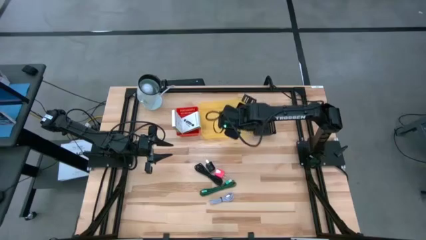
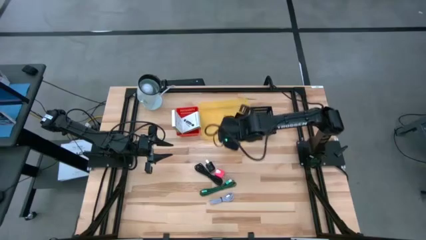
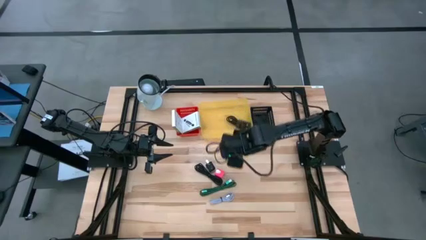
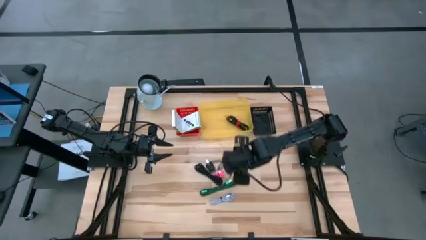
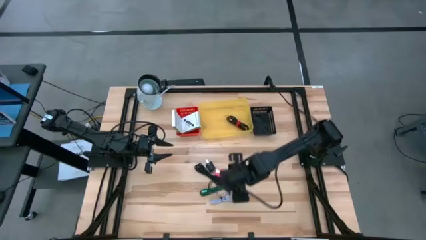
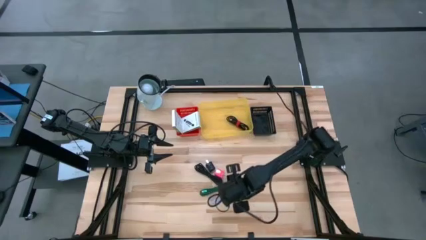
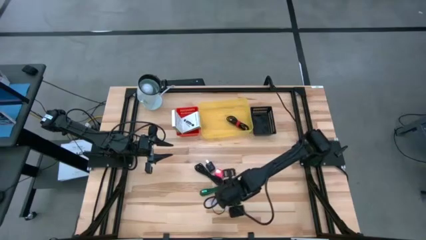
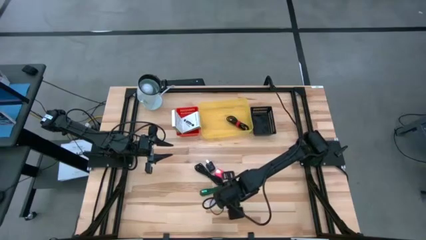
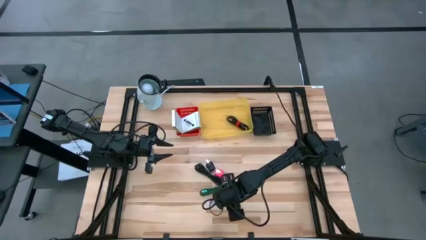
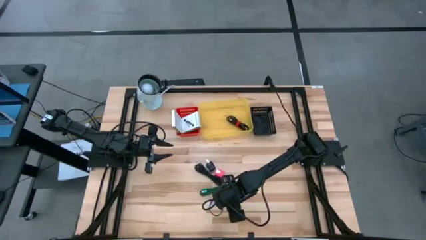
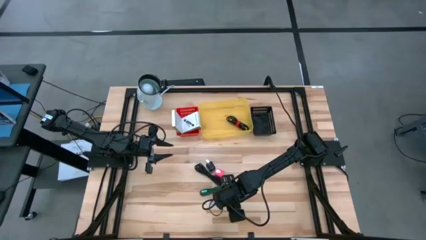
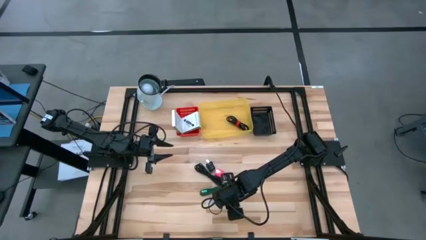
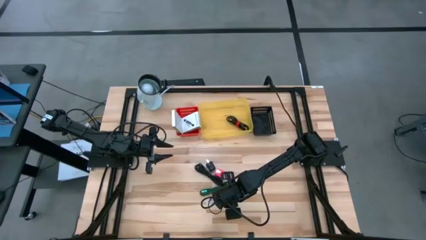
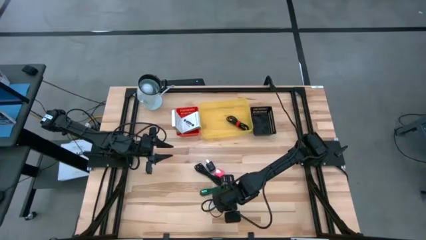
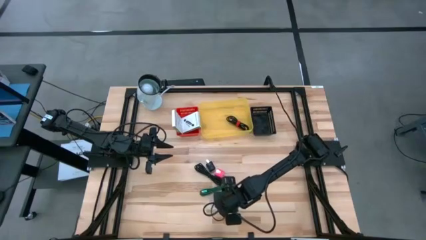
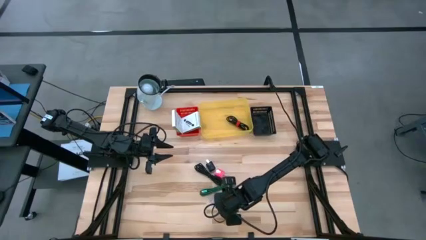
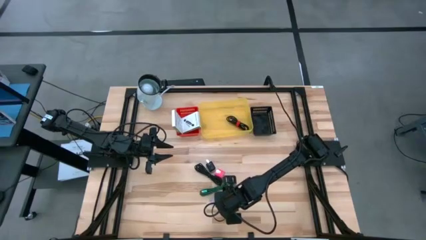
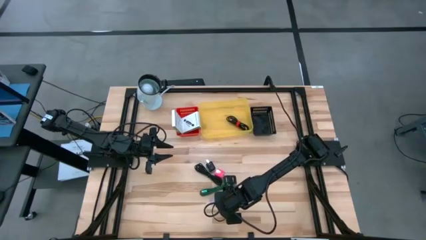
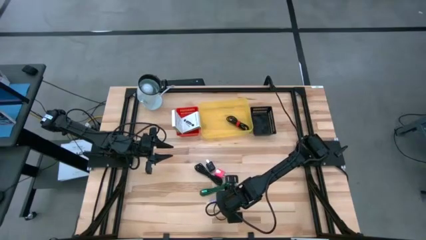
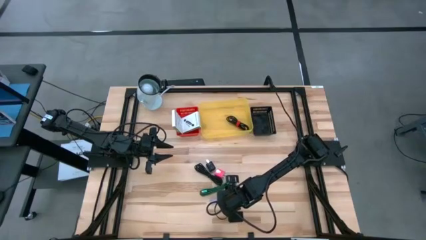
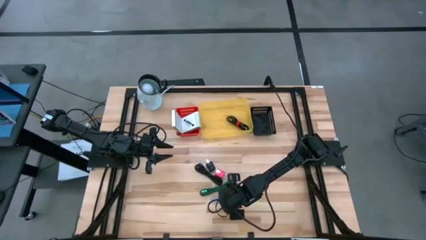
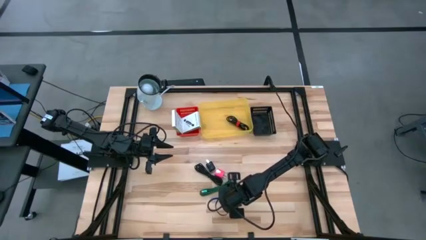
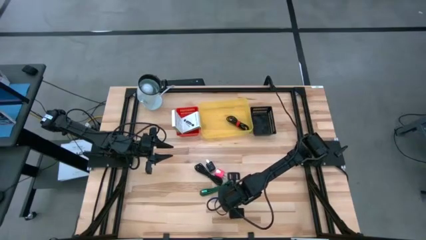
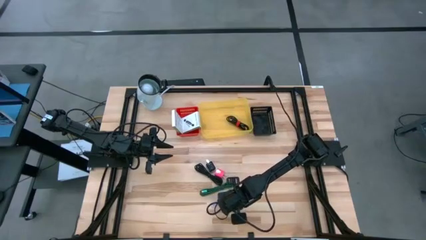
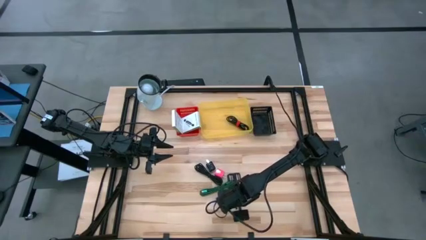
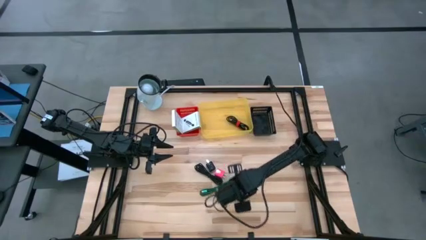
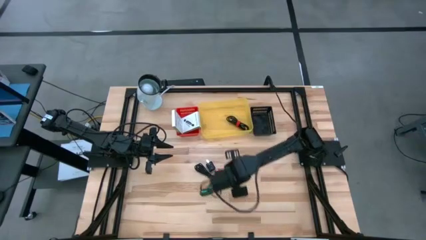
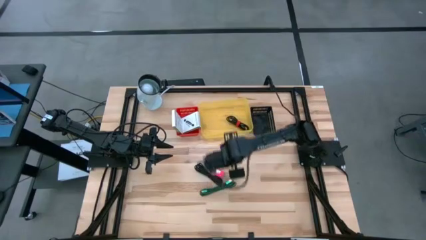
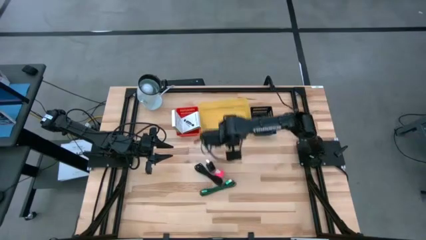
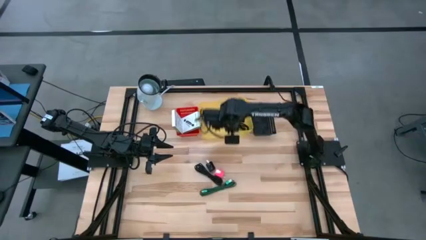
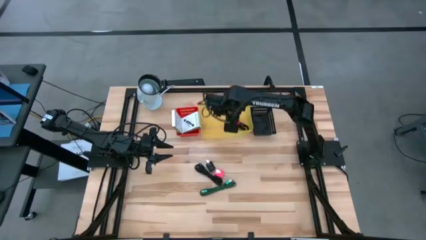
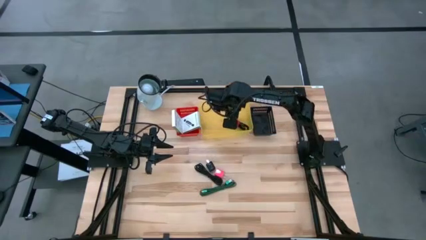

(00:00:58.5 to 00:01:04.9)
Task: Pick and place items into bin
Put the white charger cable into the yellow bin

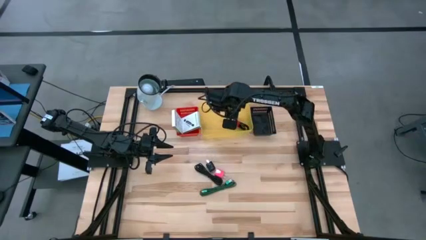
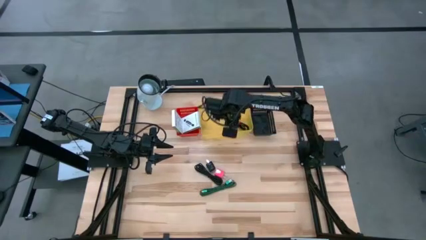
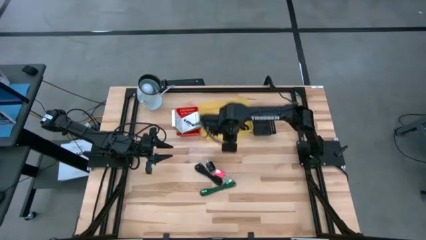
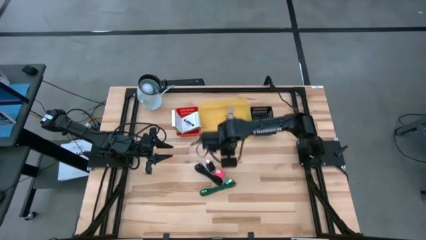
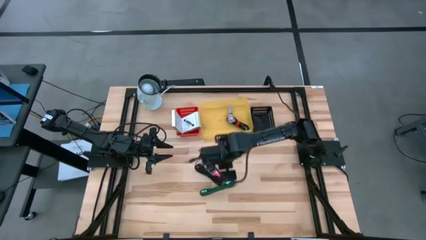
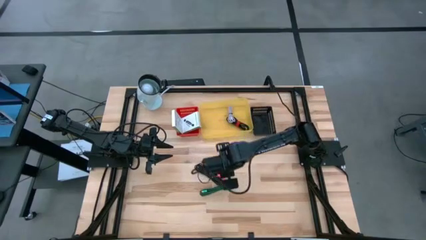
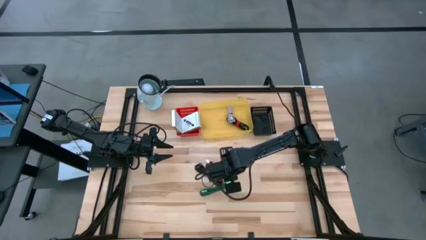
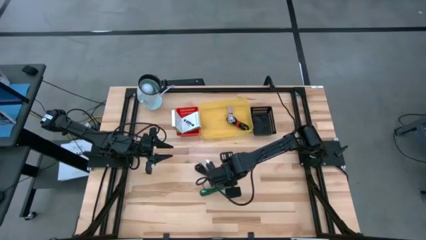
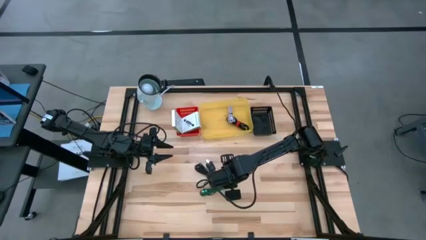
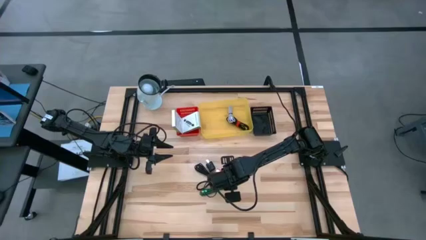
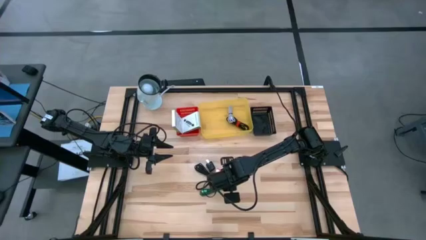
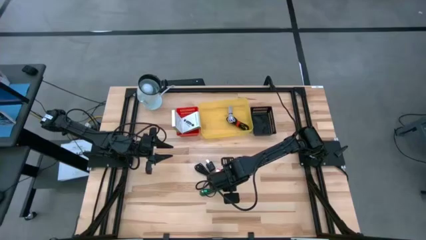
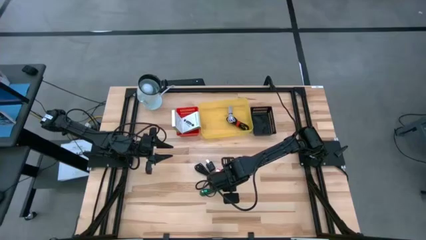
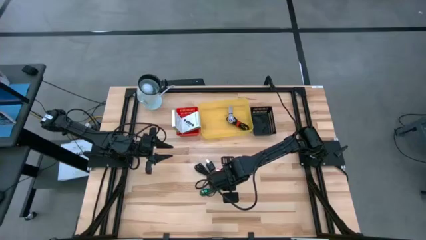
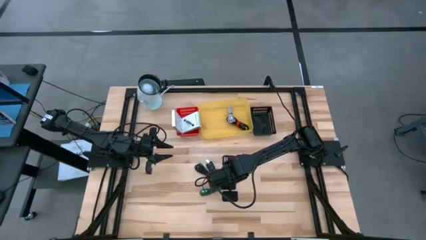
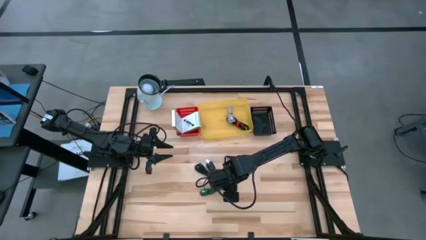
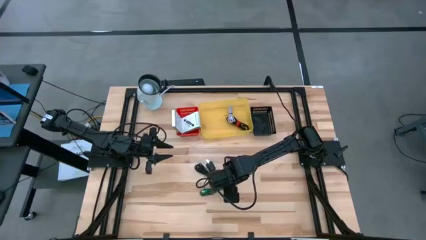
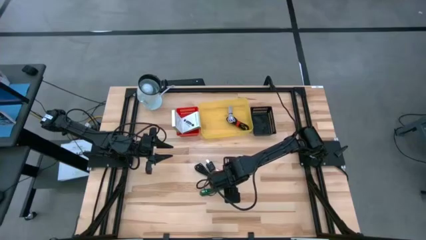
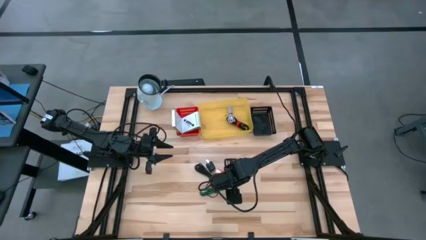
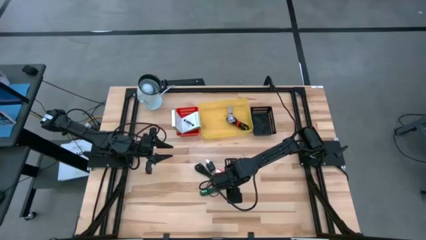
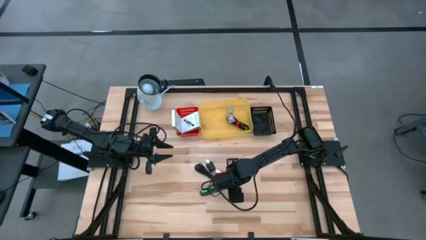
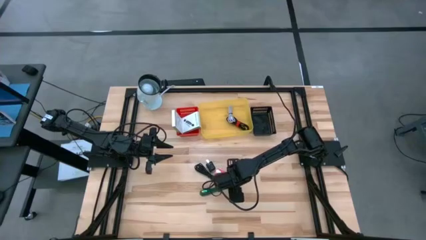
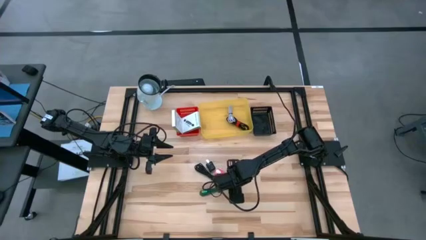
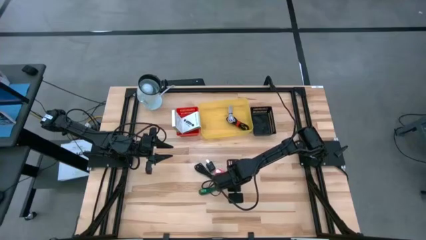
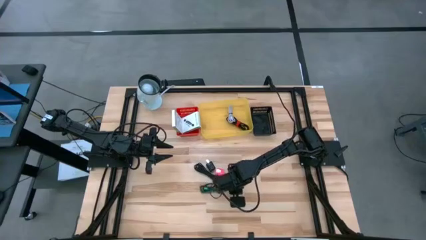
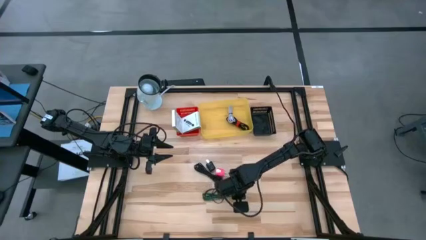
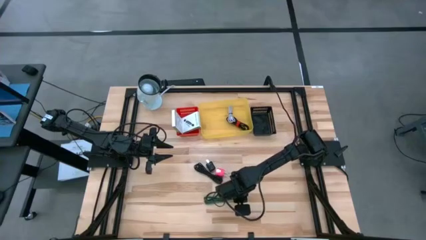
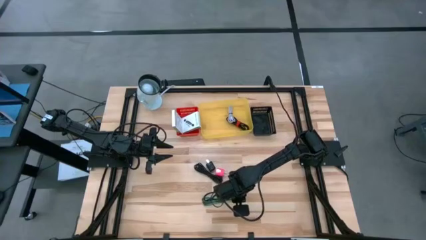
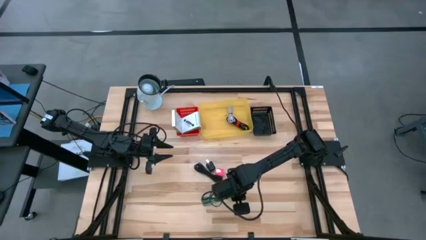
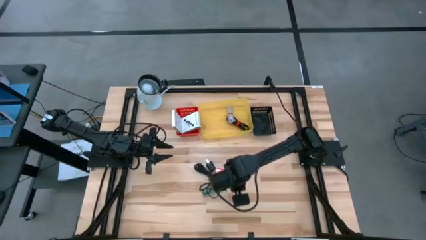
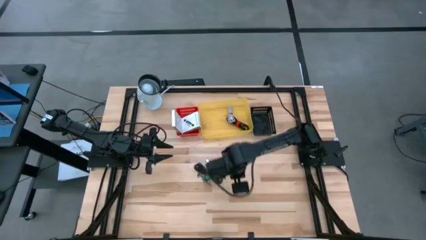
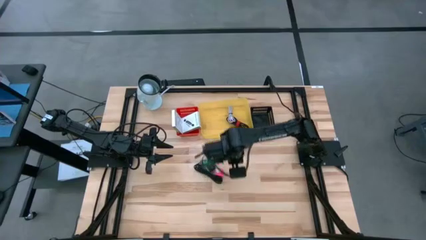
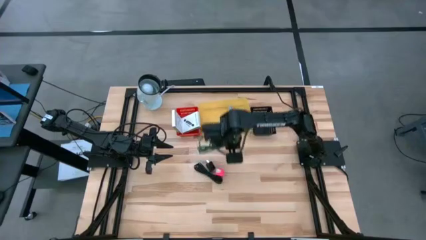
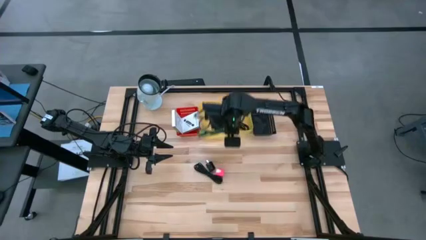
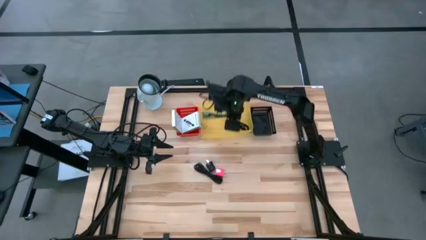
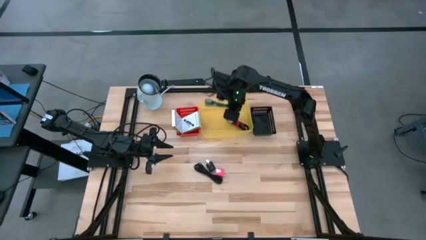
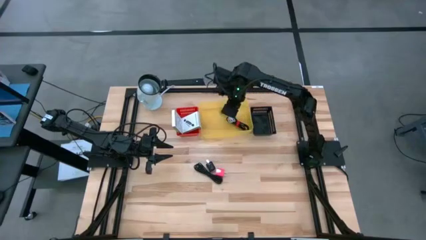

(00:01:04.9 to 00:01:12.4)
Put the green charger cable into the yellow bin

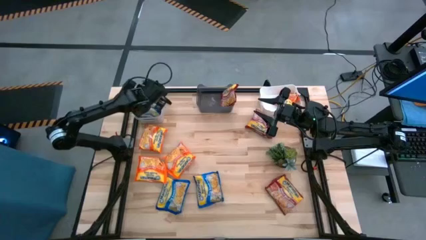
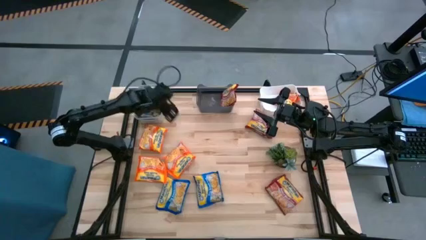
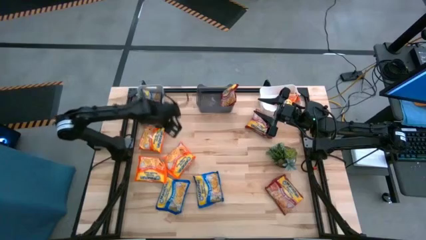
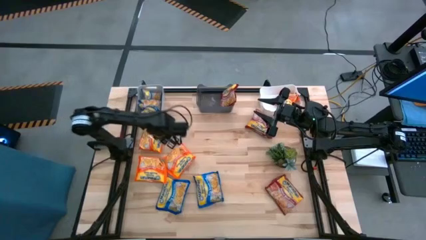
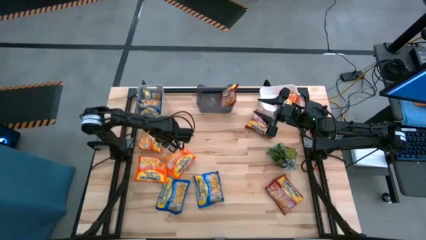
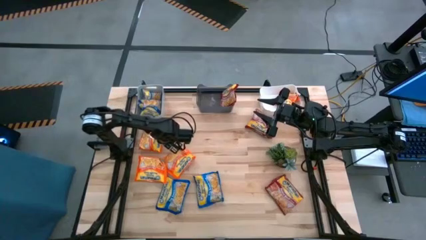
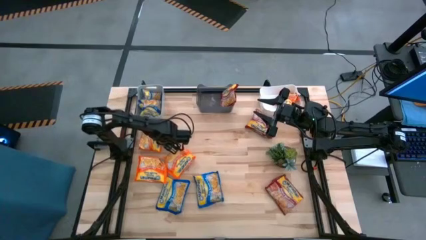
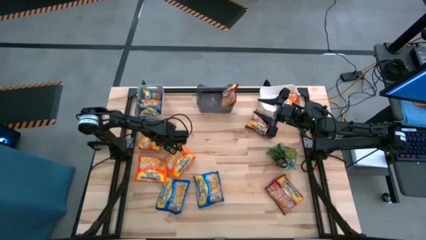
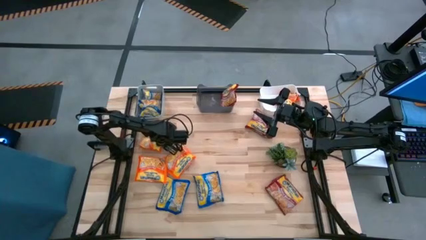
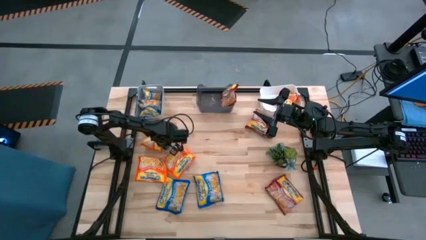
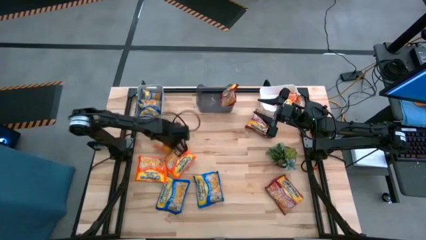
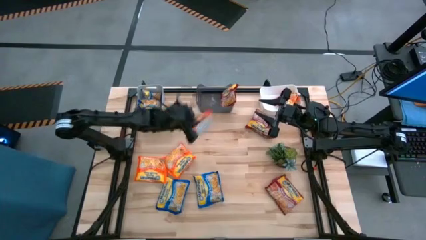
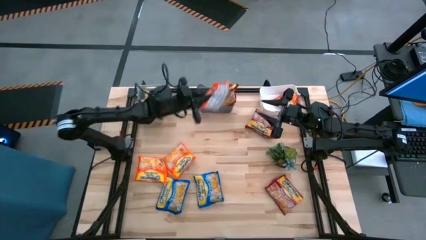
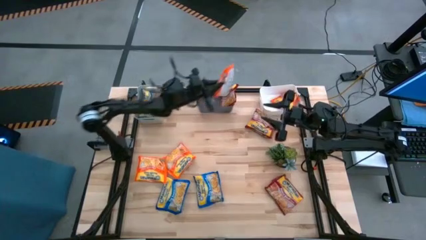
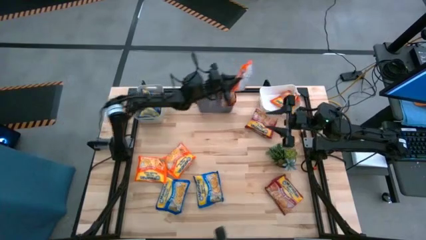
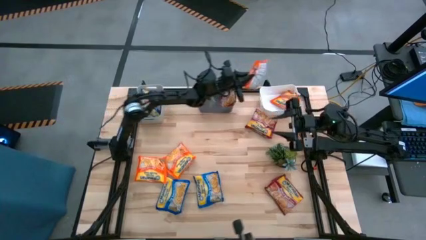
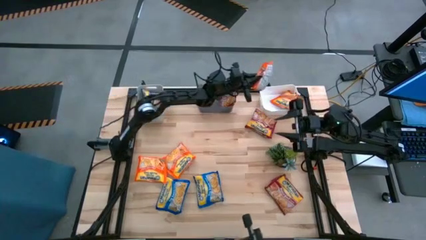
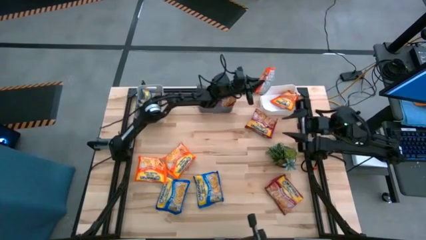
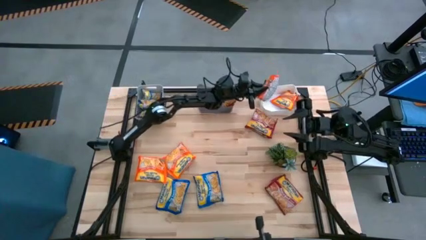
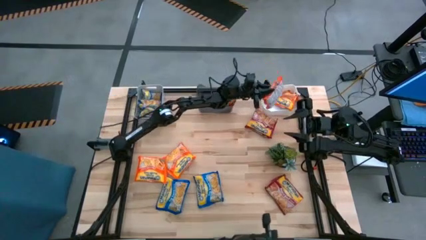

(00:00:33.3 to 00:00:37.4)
Task: Sort Maruchan noodles
Put the orange noodle pack into the white bin
